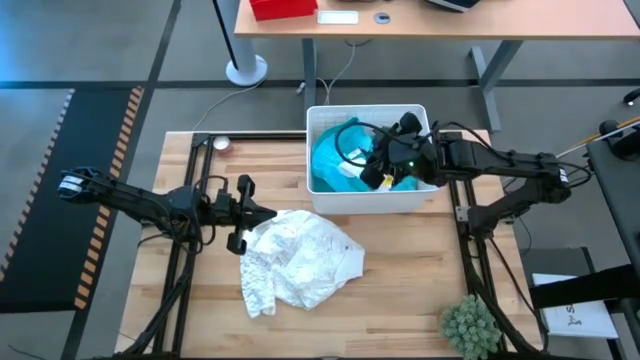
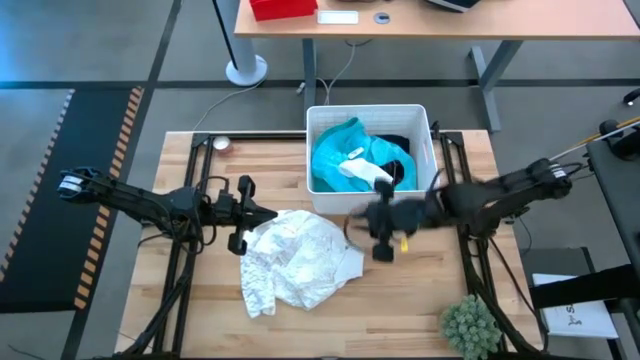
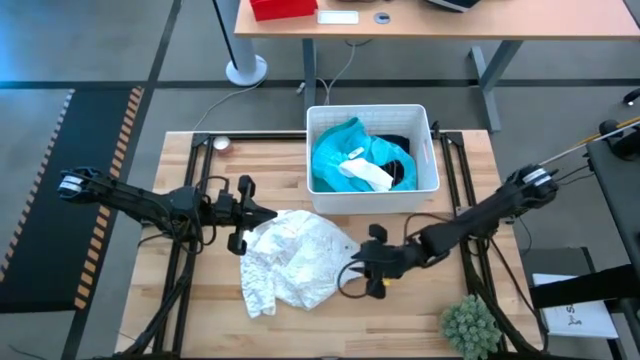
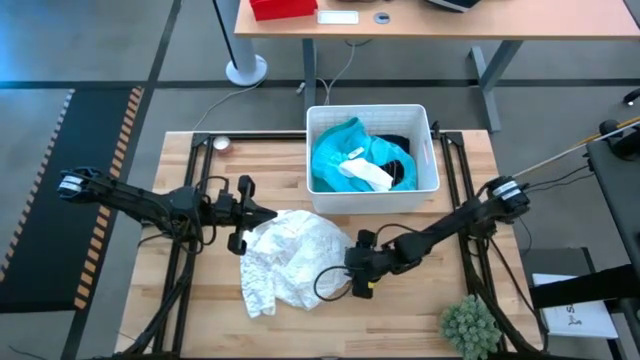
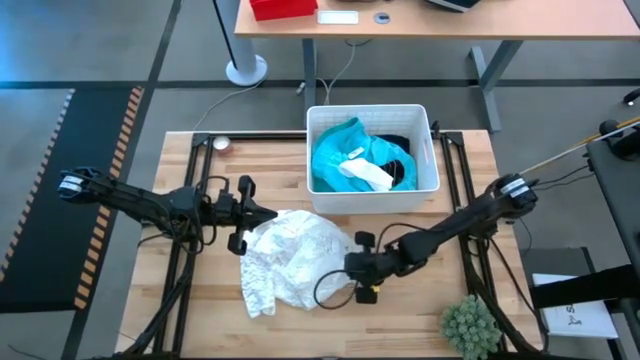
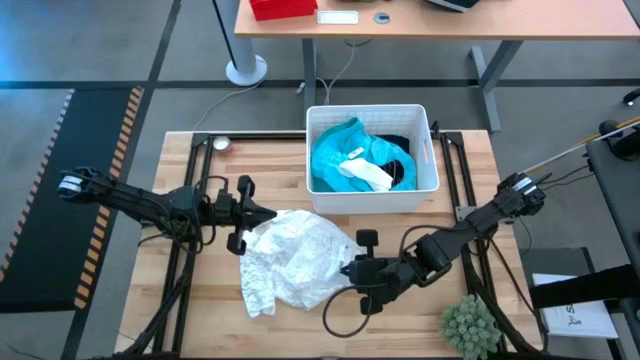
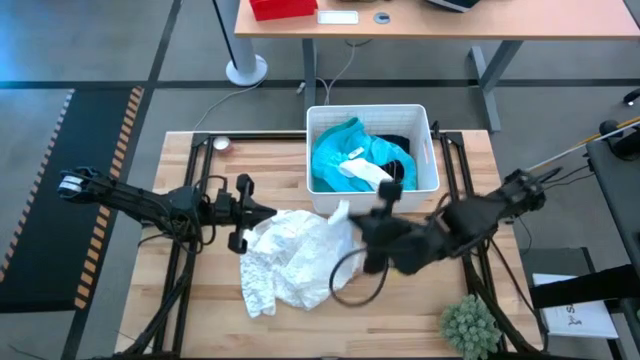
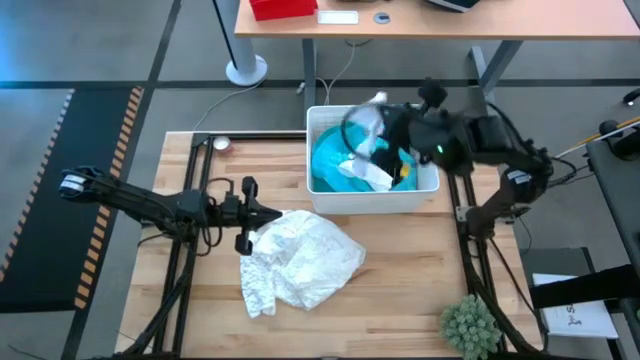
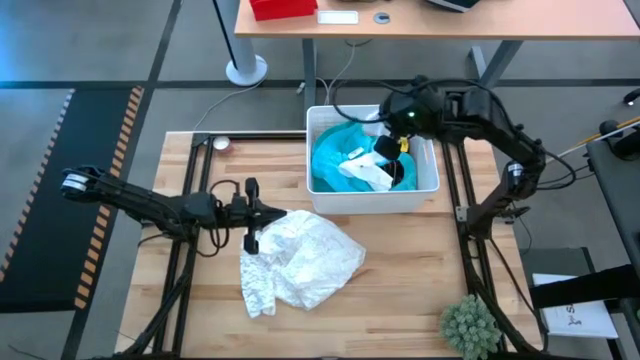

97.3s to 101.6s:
Task: Sort clothes
Put the white sock into the white laundry bin

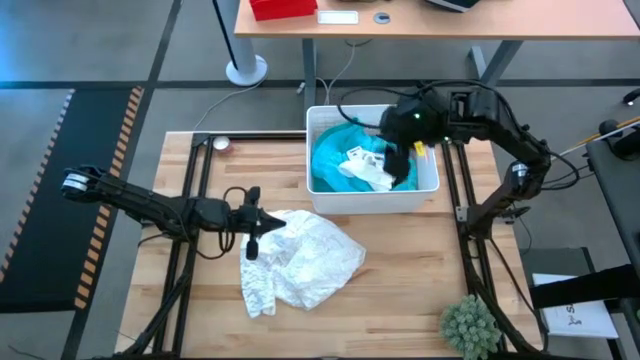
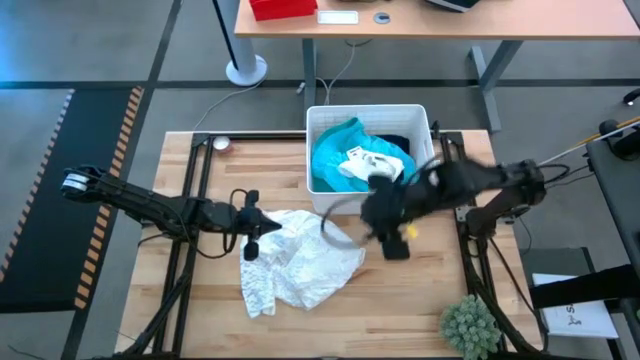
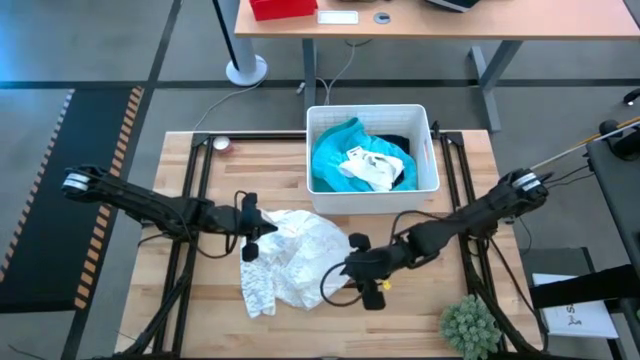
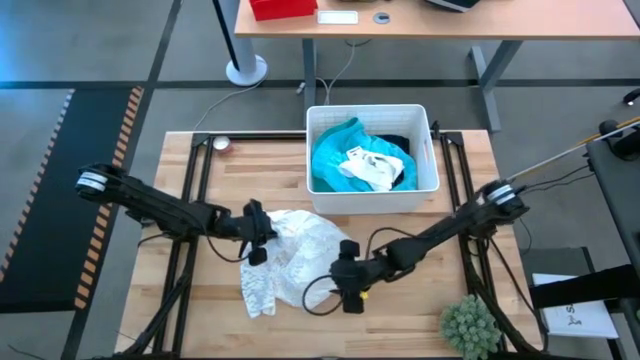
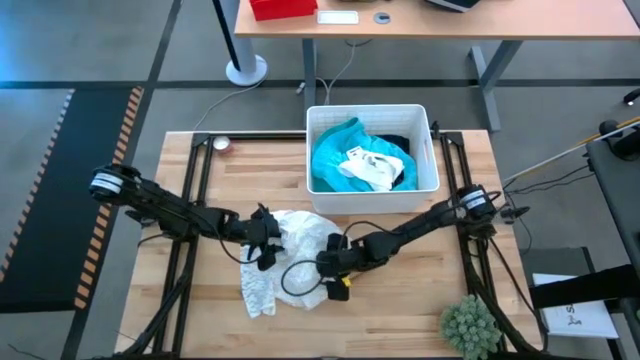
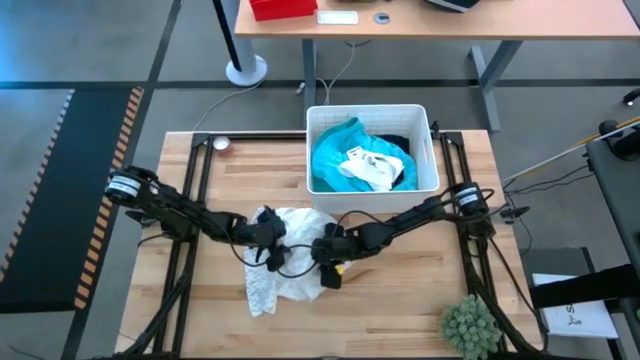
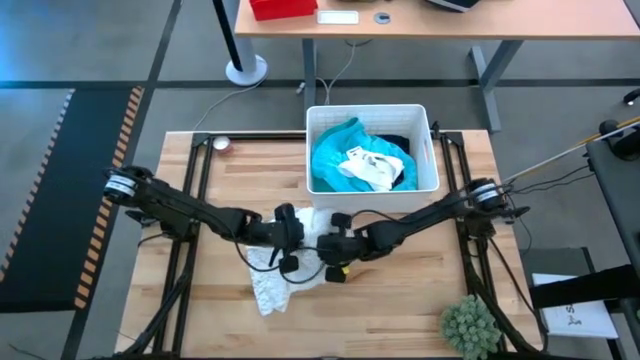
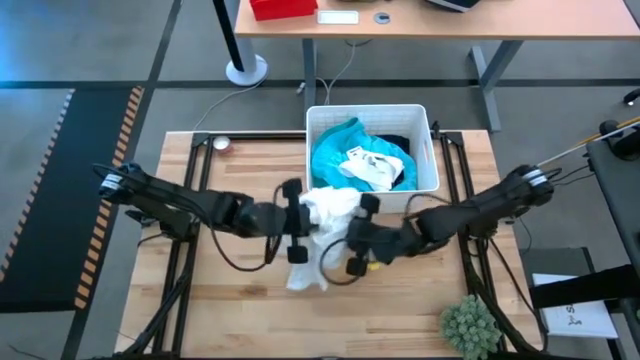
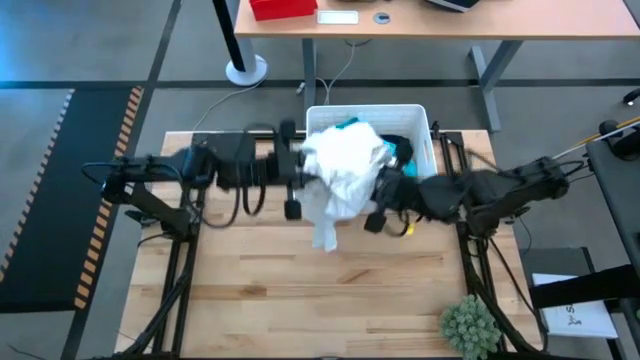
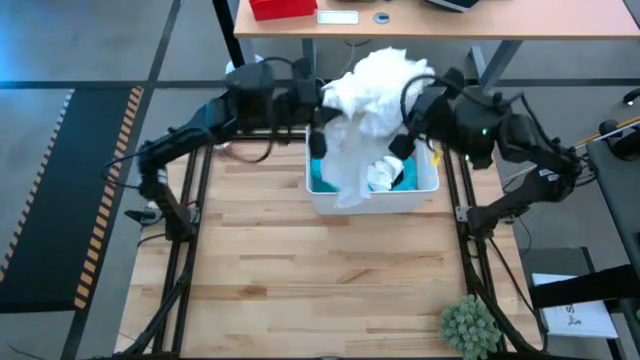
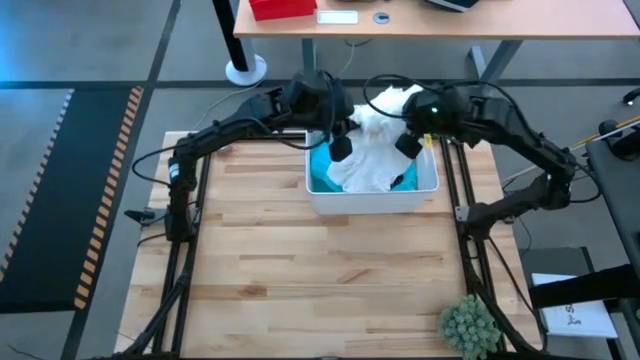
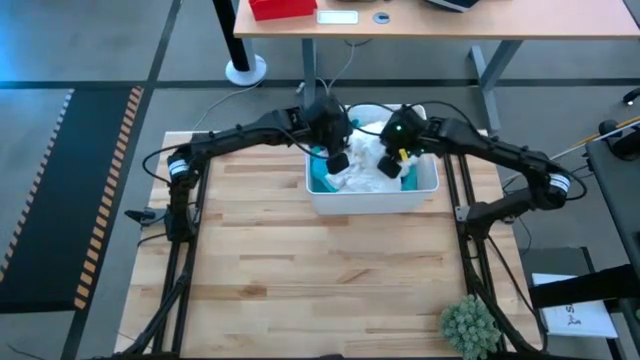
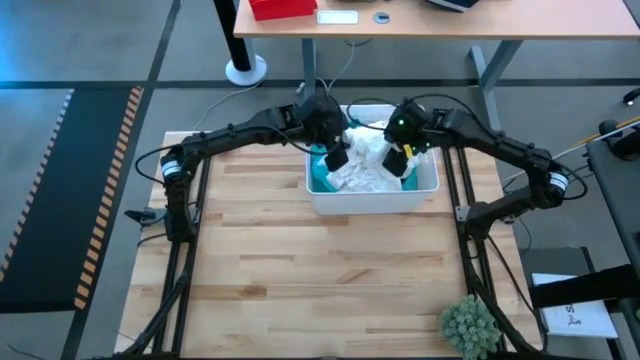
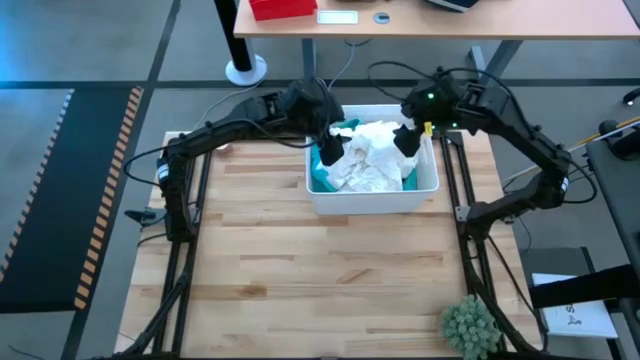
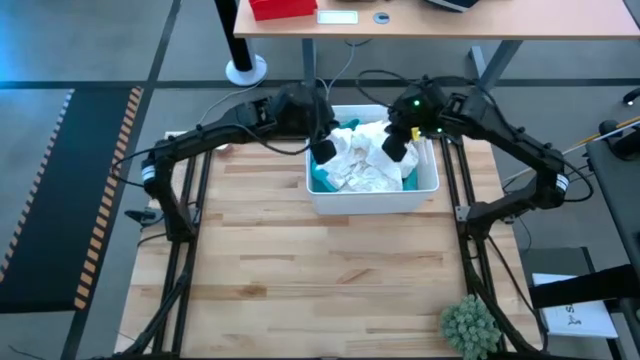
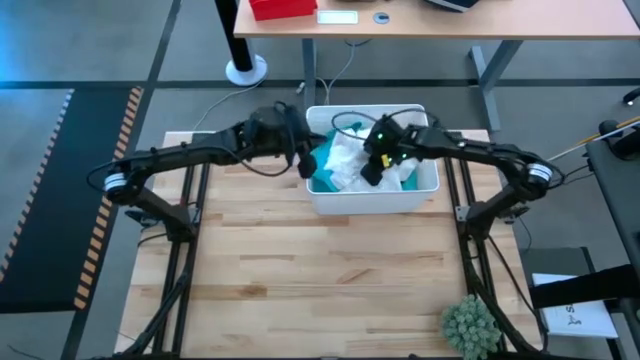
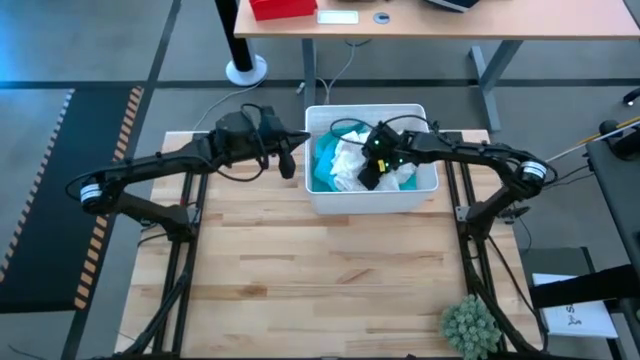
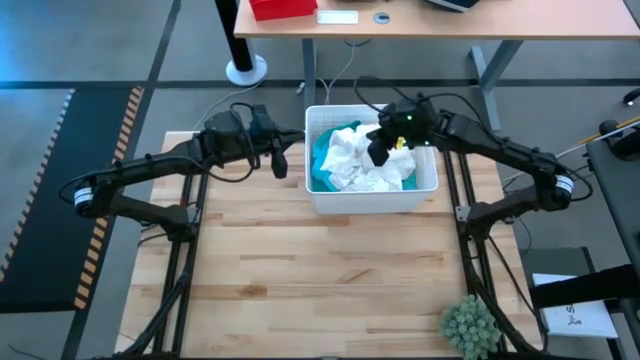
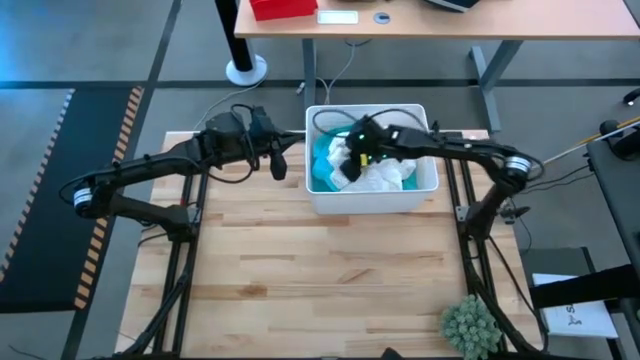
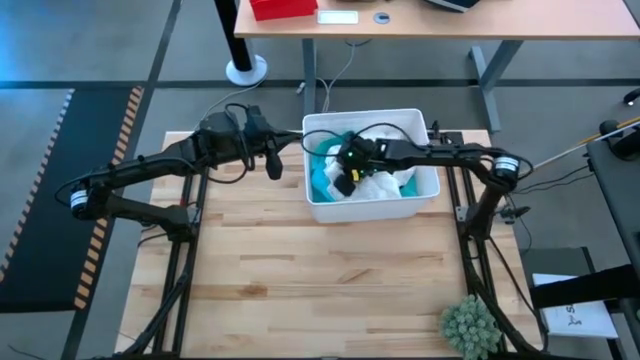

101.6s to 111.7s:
Put the white dress into the white laundry bin

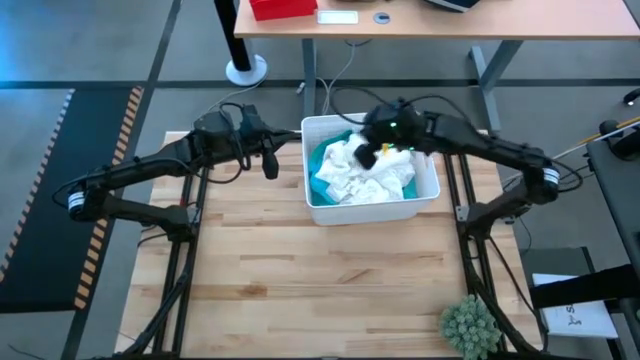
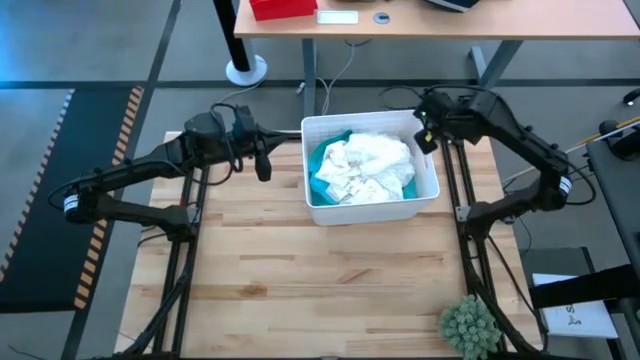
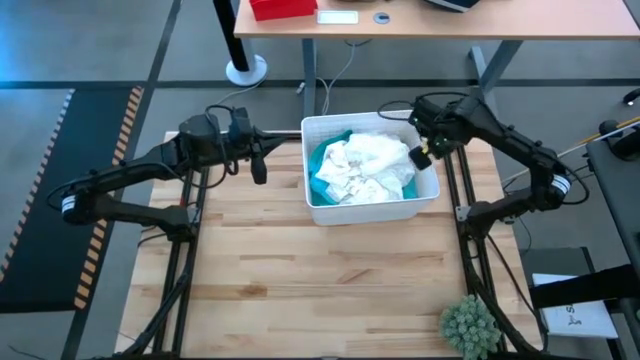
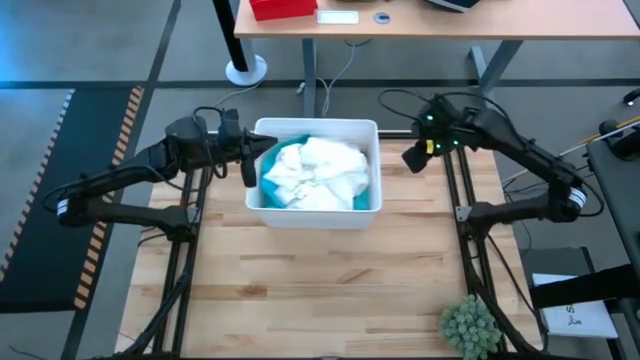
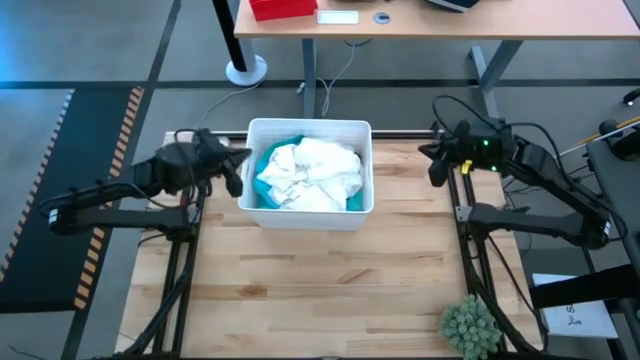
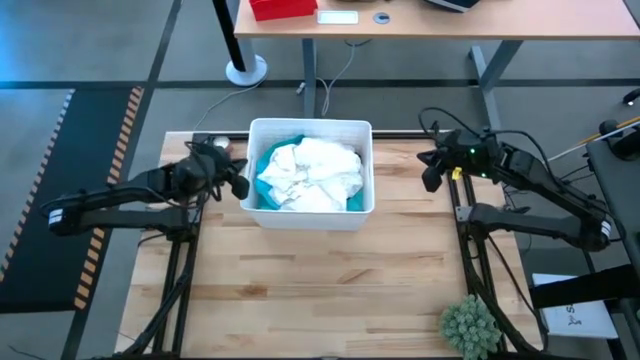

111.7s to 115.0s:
Adjust the white laundry bin

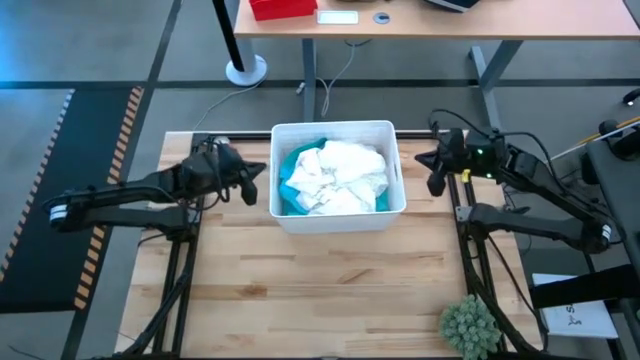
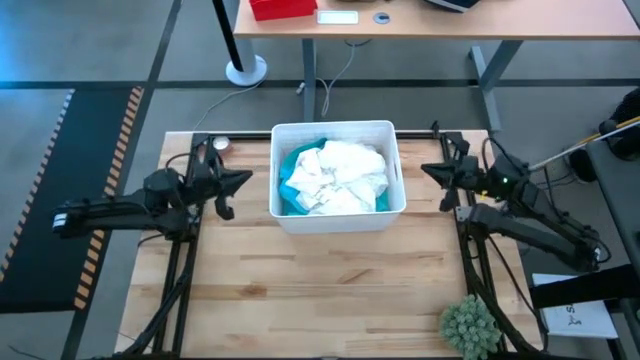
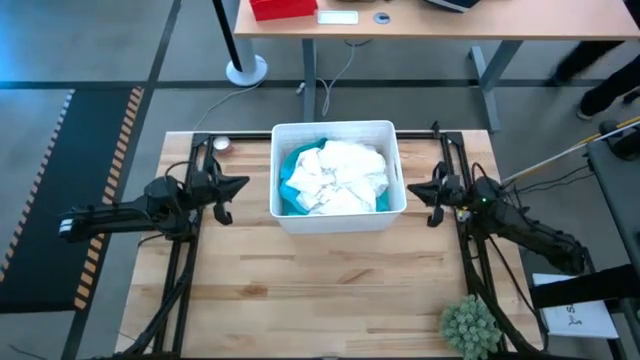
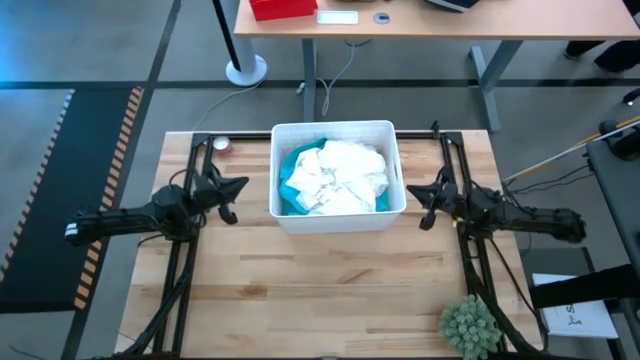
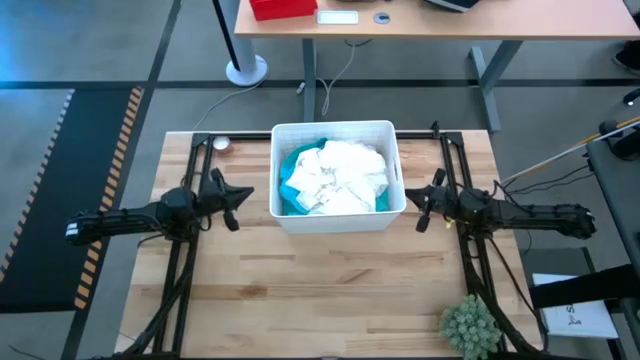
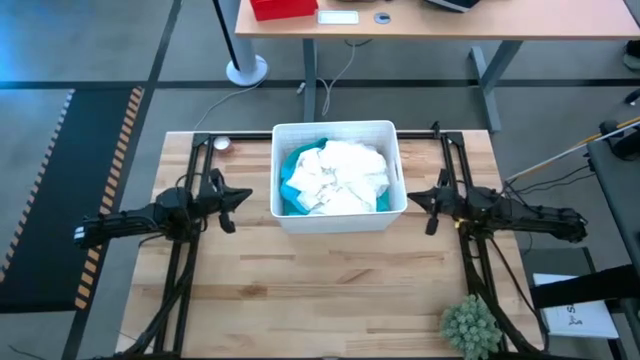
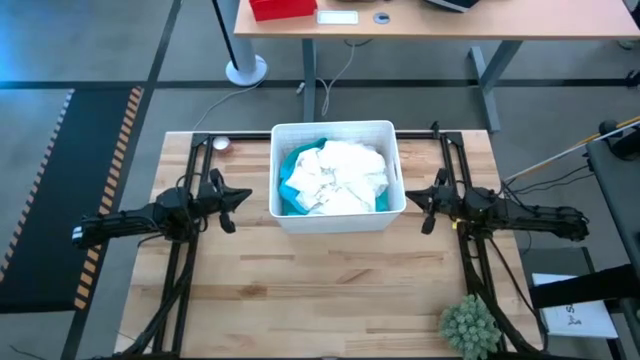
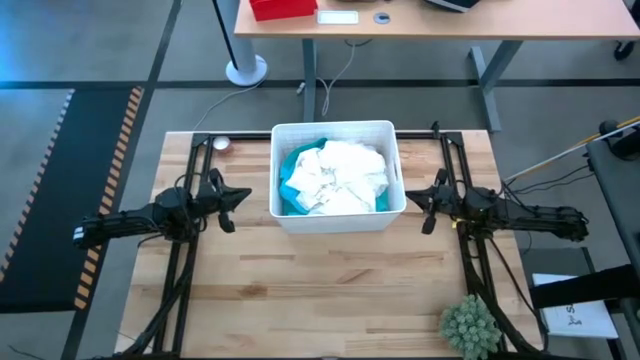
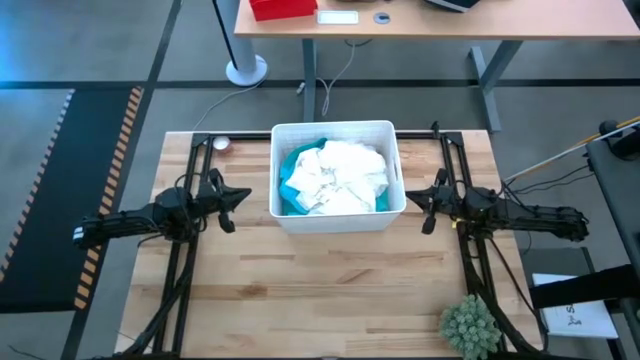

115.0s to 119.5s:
Return to Home Position
